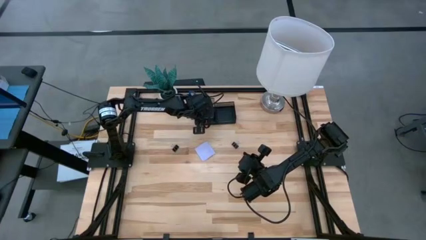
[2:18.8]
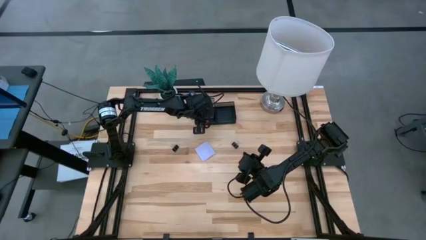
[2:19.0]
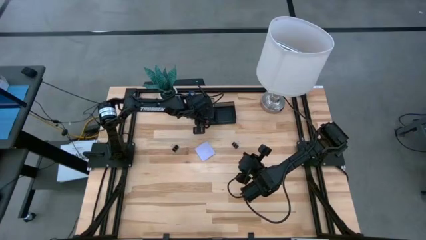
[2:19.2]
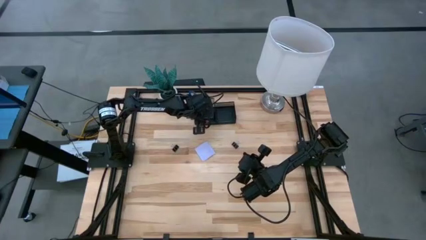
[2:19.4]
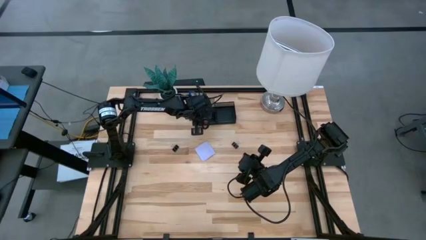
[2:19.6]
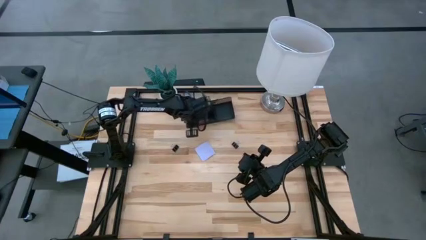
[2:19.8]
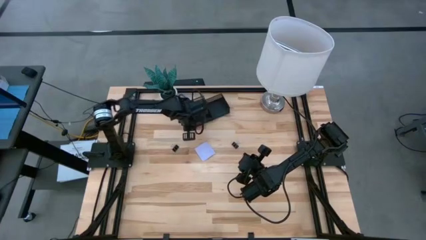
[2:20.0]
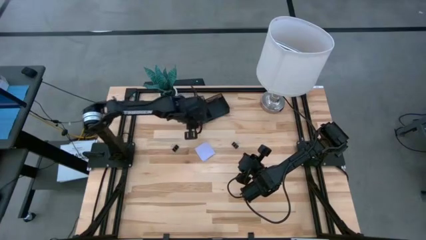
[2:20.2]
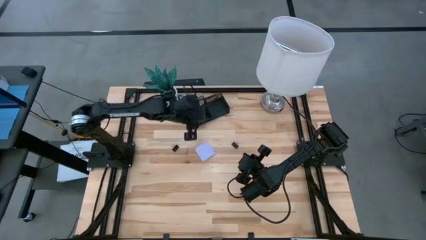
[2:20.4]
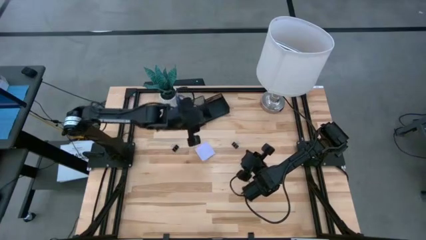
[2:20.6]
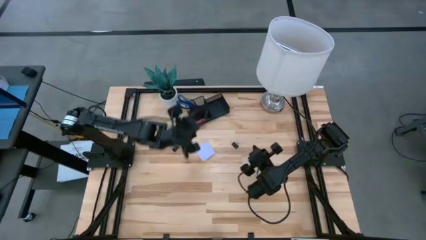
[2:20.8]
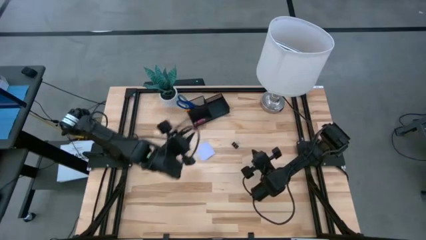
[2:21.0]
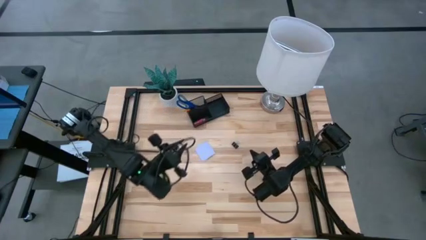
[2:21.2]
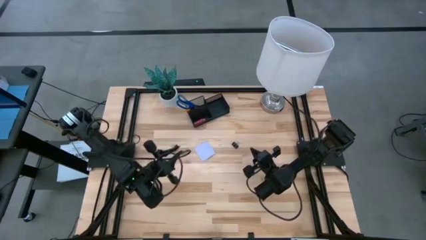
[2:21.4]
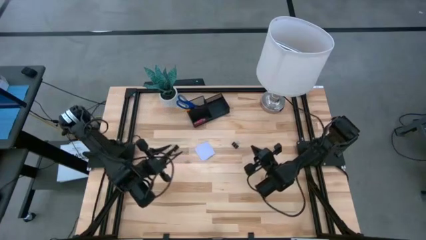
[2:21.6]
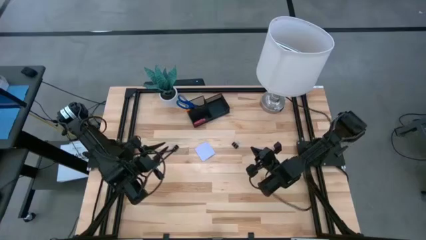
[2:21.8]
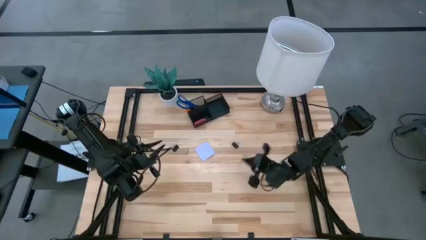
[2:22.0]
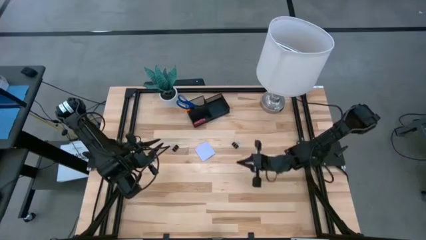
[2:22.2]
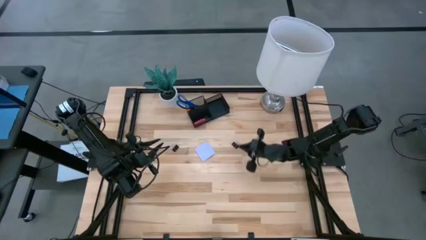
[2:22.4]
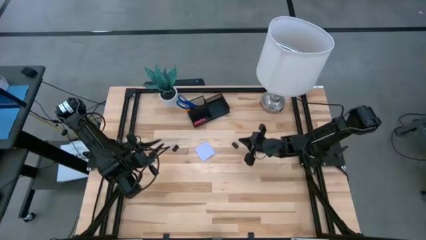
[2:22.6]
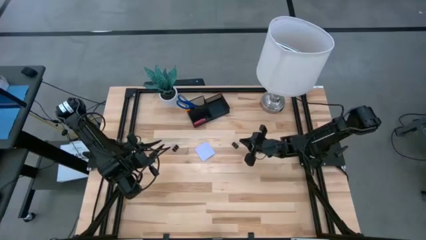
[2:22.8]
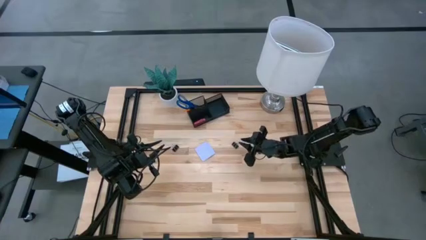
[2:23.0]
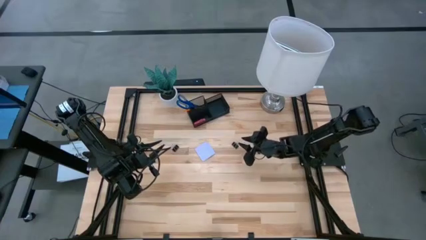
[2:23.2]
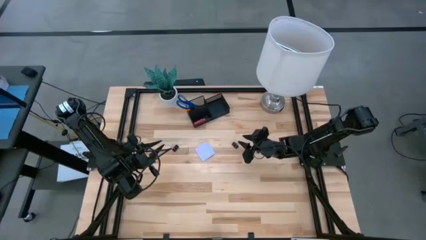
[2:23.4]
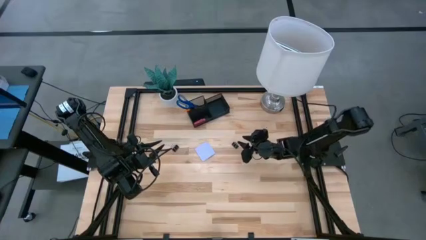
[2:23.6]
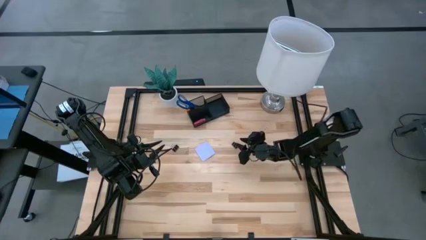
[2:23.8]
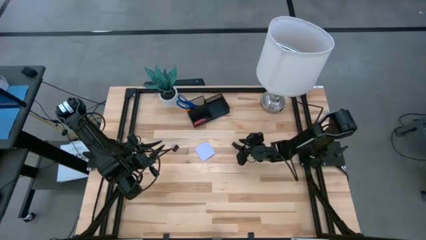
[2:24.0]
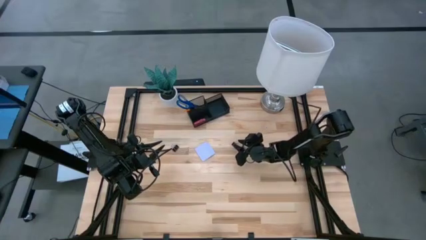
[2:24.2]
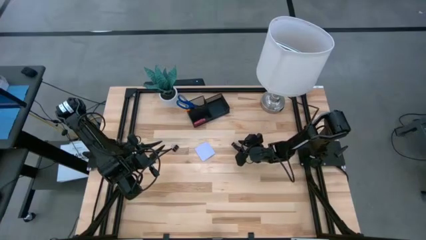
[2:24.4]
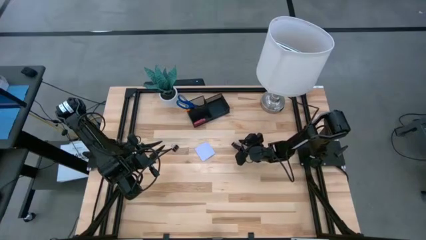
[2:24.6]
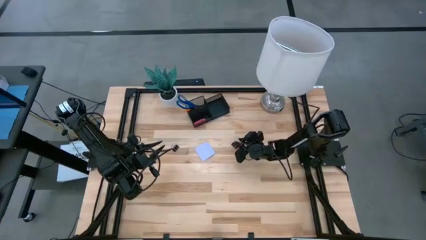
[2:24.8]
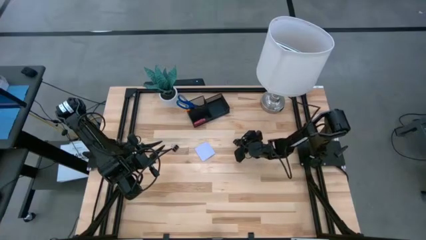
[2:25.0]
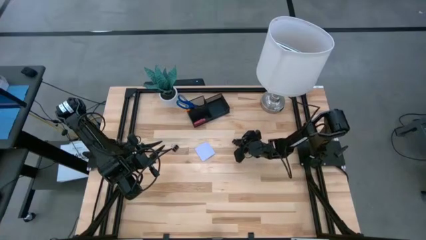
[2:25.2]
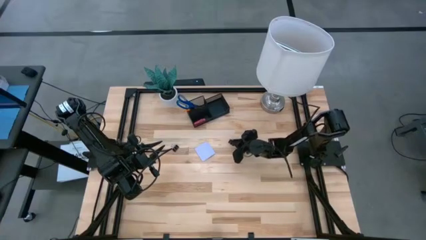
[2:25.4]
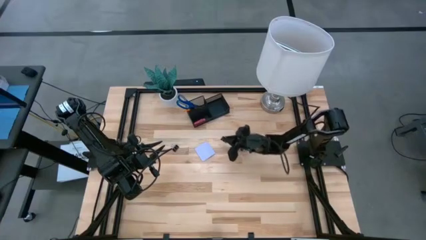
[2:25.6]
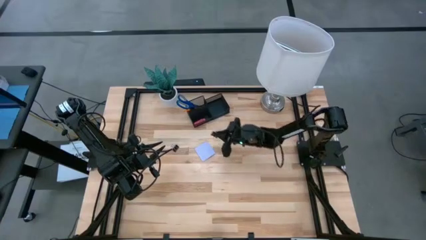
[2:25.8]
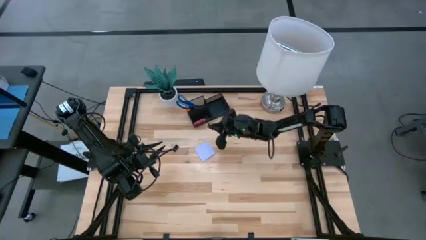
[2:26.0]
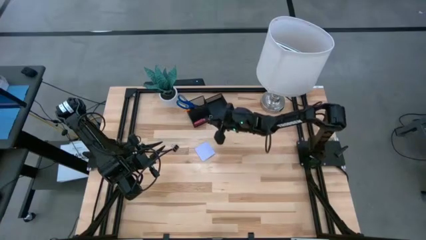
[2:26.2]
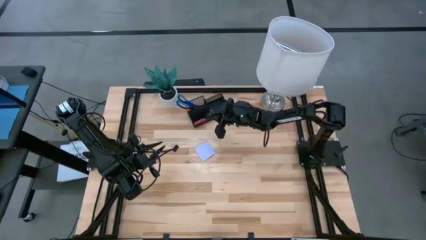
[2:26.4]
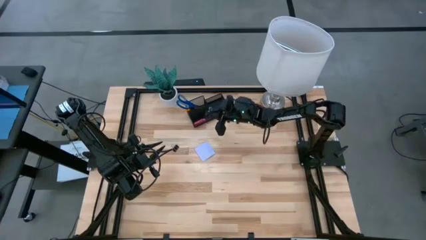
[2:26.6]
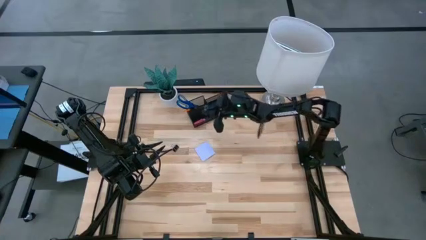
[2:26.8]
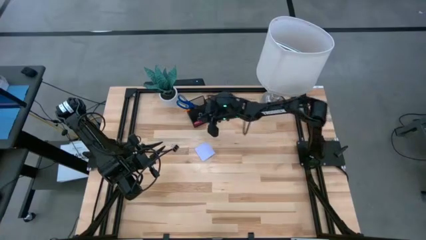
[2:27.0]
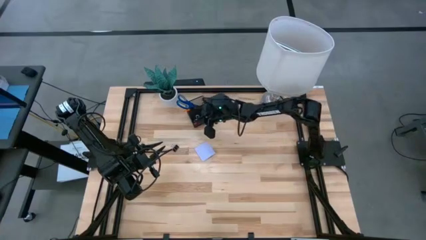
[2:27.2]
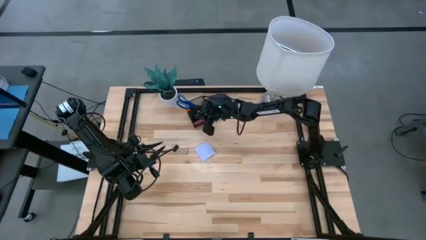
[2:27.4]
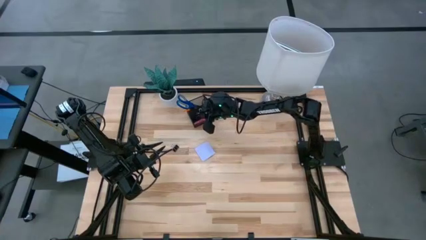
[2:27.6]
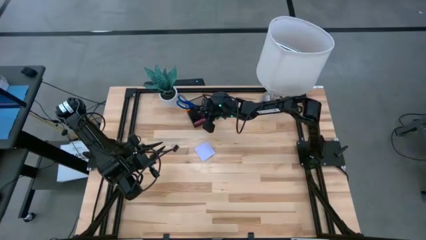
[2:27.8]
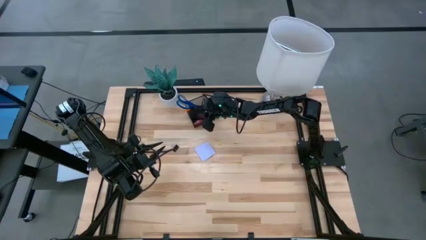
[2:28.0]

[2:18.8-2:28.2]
Task: Pick and place office supplies into organizer
Put the right binder clip into the desk organizer

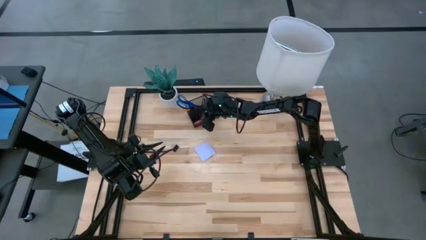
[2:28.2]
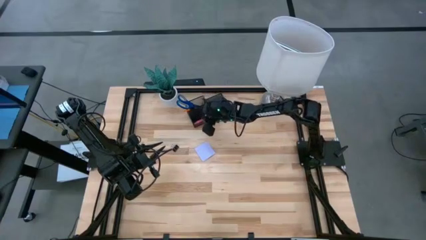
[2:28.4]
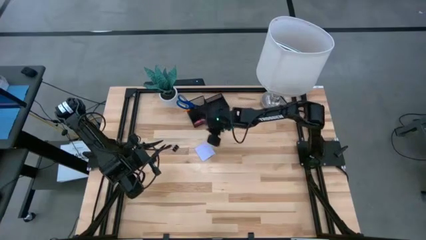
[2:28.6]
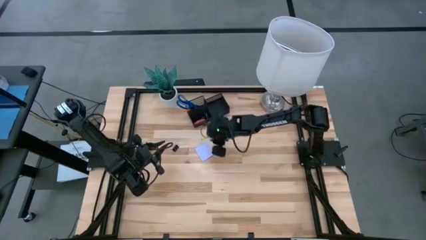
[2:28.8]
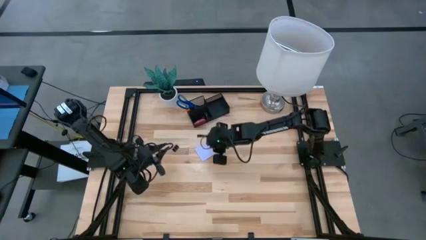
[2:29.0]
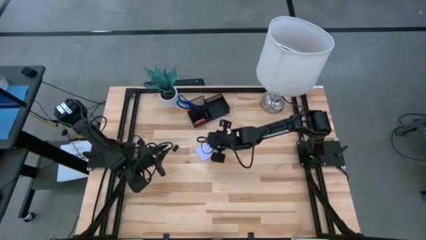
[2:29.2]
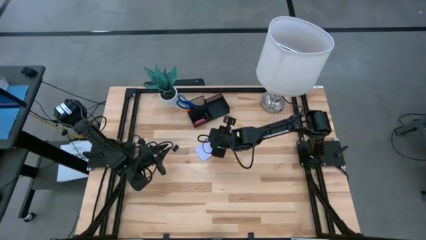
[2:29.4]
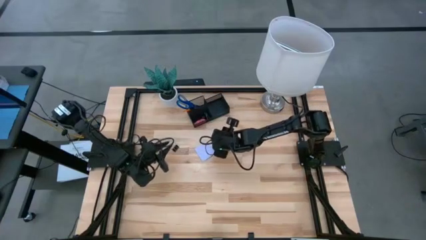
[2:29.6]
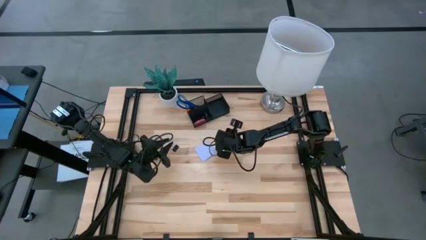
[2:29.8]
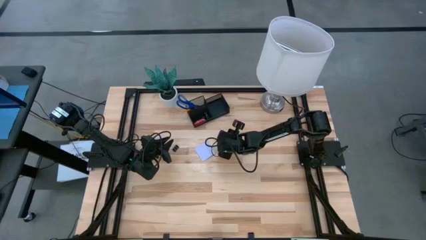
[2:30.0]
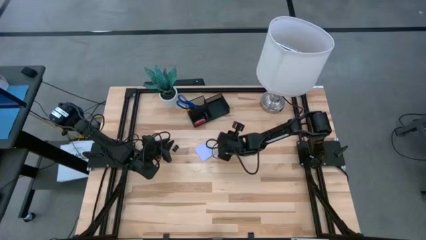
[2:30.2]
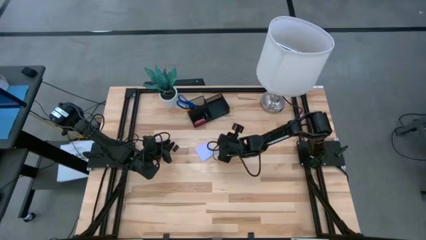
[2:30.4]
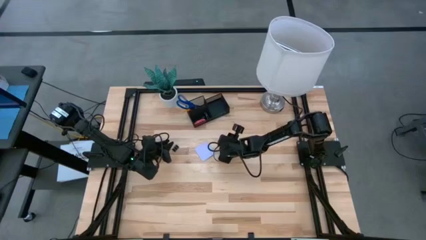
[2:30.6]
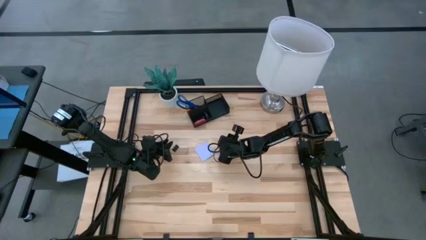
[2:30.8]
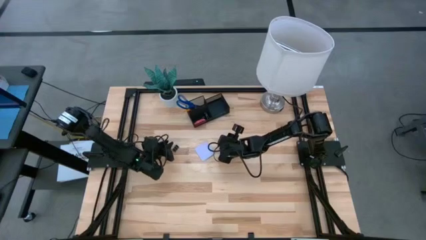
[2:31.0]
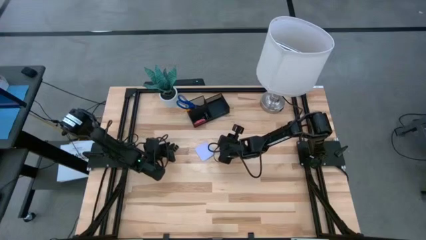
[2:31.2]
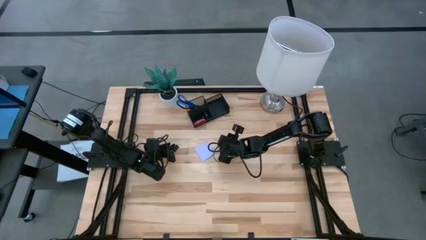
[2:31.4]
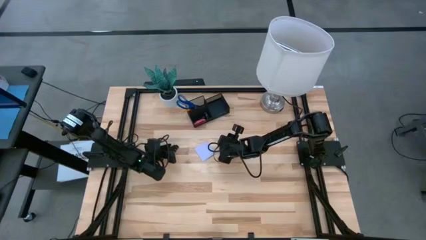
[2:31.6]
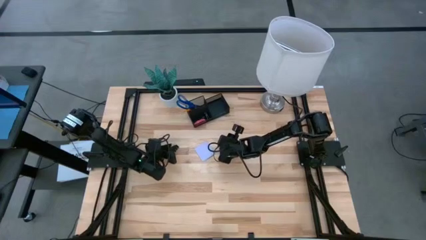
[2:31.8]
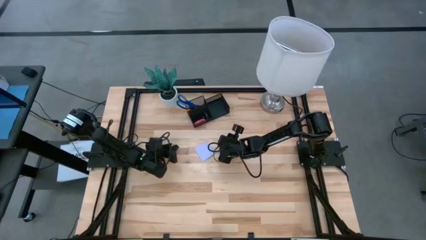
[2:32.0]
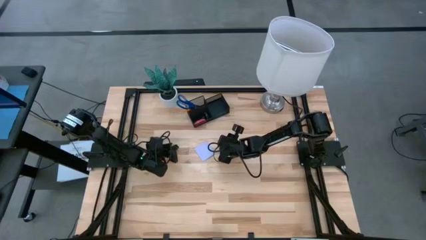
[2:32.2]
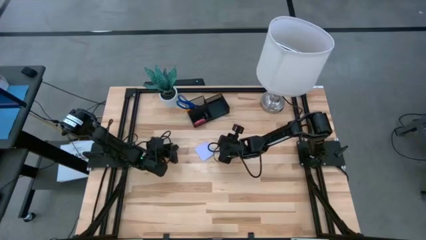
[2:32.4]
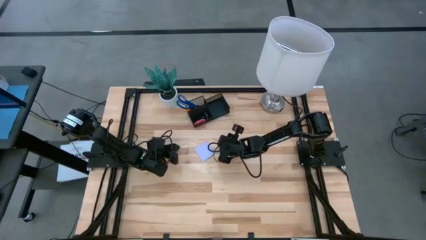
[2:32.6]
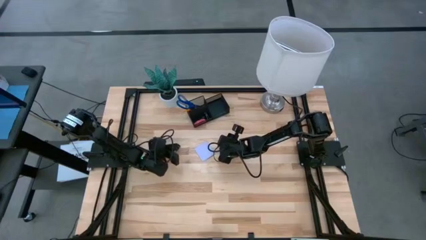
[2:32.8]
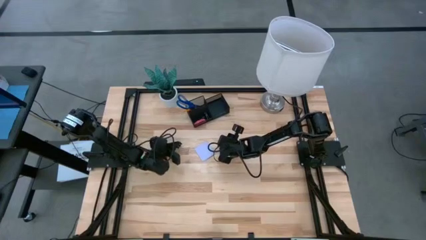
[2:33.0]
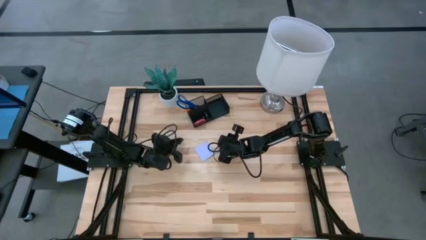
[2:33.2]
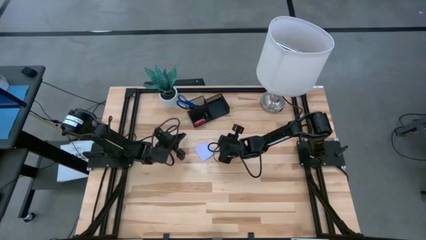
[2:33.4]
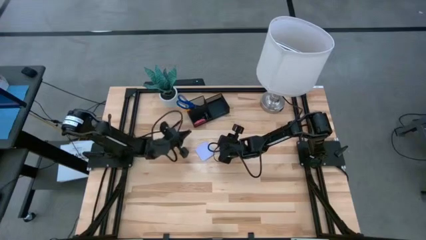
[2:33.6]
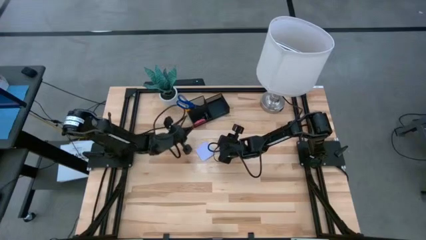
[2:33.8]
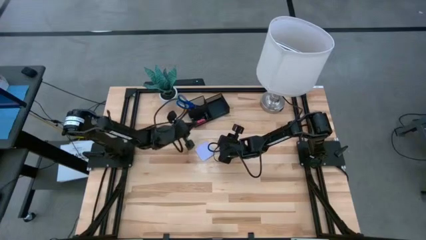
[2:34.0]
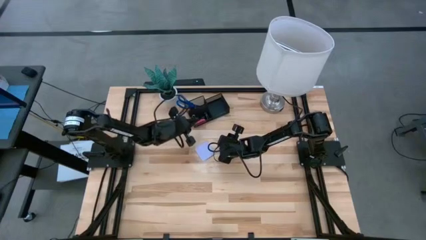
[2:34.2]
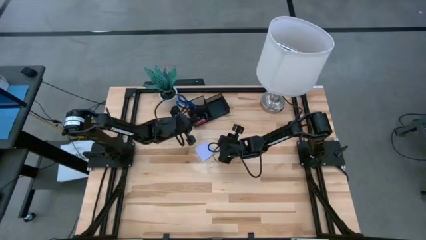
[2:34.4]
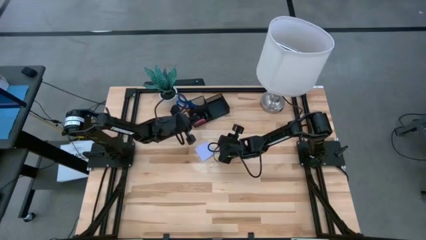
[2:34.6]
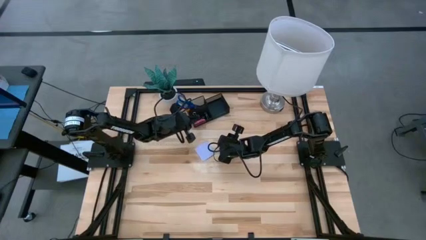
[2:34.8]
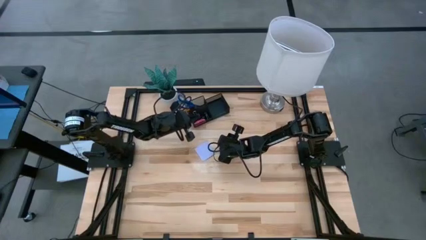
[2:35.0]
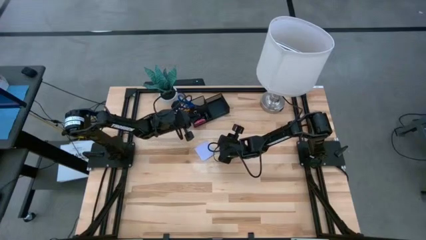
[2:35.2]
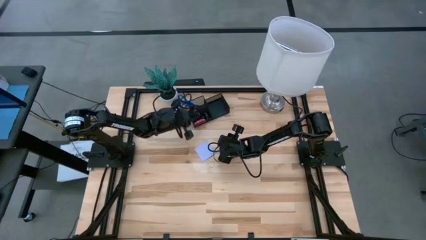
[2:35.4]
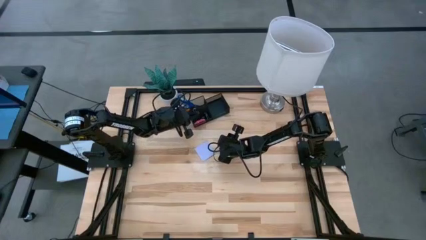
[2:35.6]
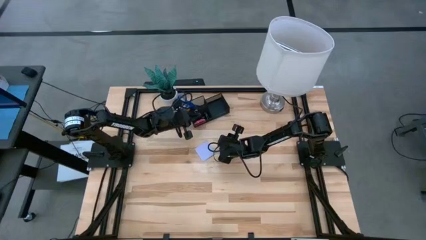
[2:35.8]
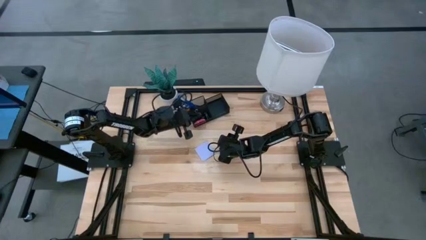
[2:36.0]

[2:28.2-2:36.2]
Put the binder clip into the desk organizer
